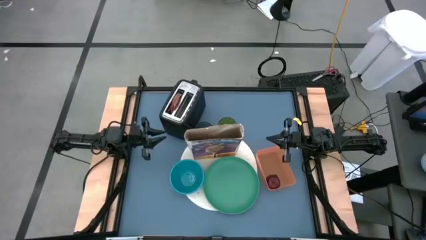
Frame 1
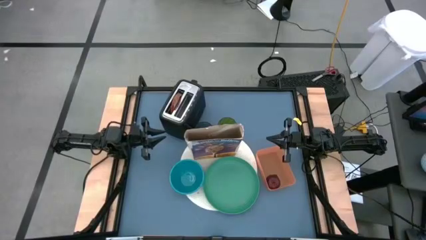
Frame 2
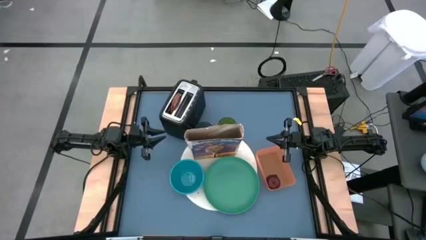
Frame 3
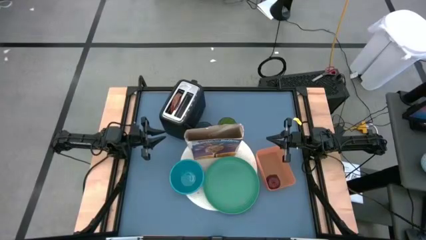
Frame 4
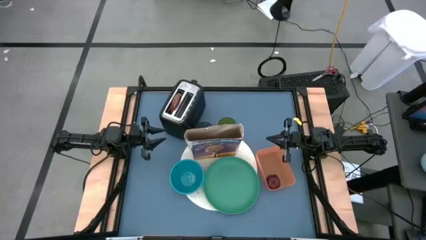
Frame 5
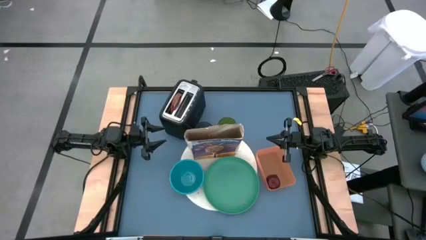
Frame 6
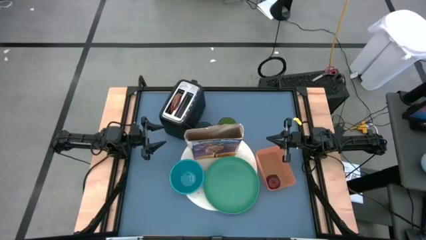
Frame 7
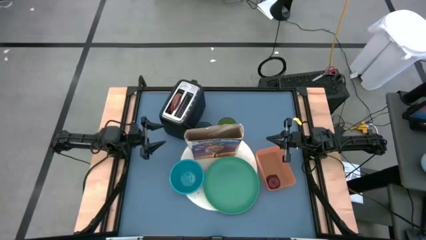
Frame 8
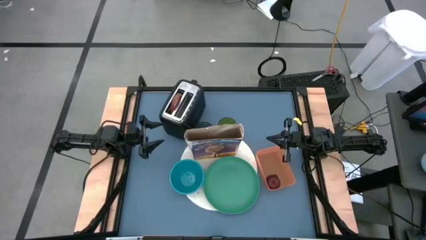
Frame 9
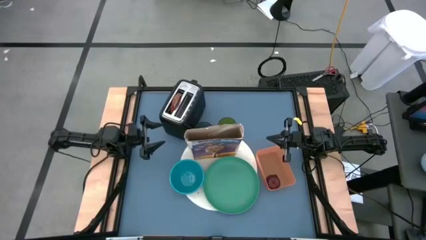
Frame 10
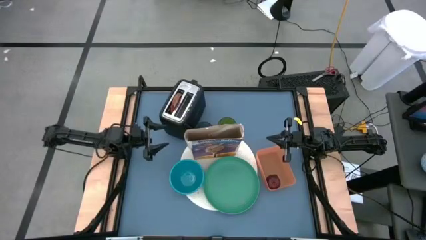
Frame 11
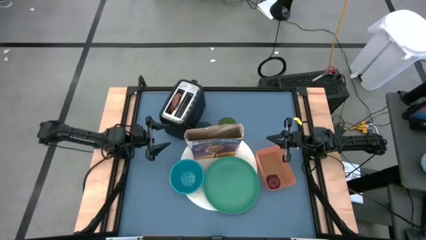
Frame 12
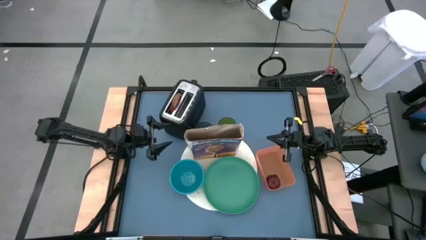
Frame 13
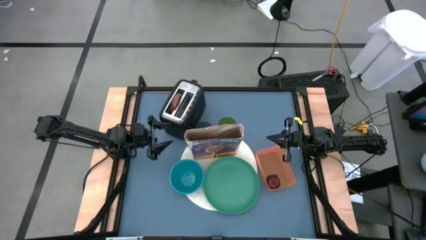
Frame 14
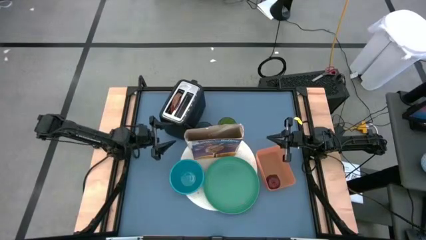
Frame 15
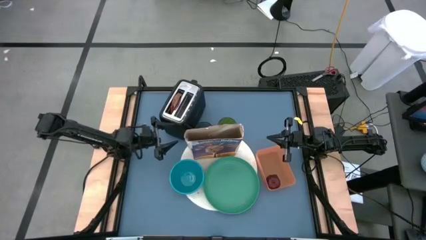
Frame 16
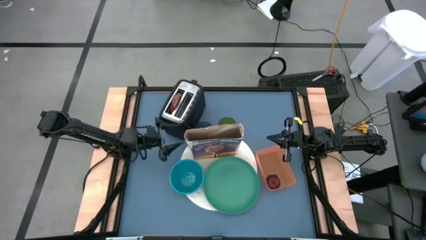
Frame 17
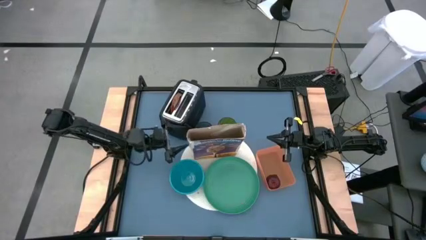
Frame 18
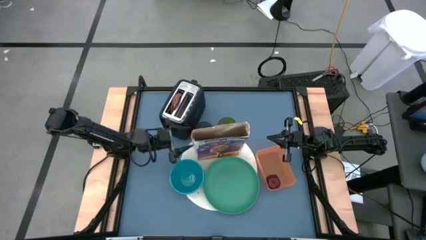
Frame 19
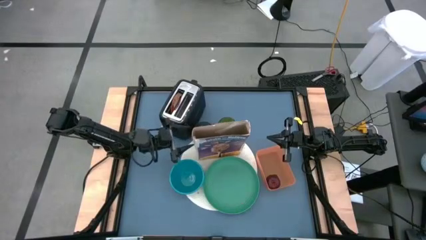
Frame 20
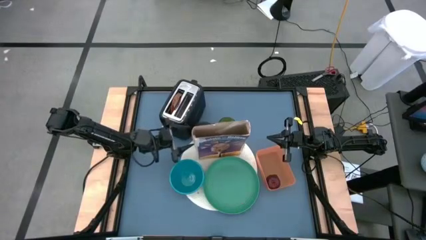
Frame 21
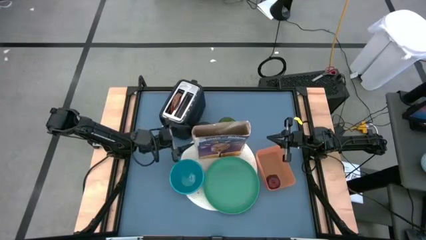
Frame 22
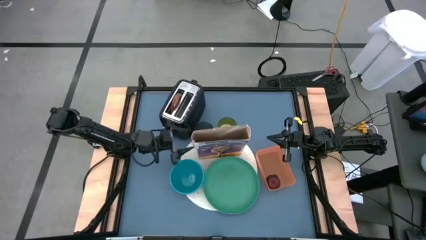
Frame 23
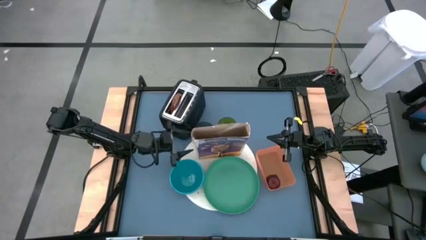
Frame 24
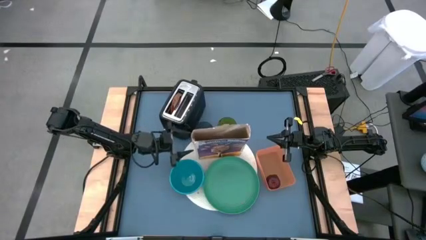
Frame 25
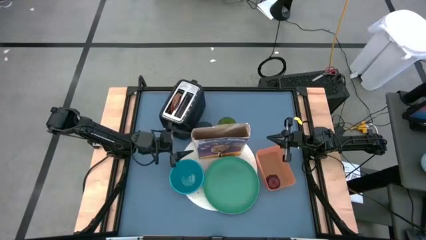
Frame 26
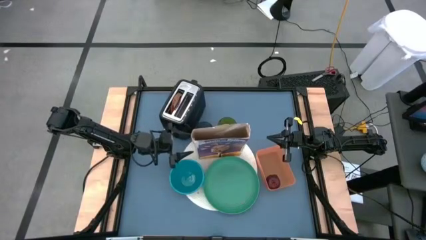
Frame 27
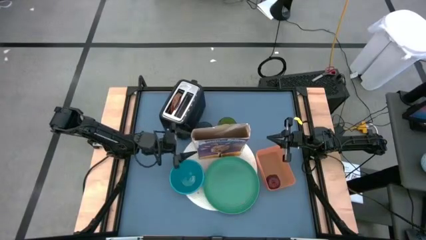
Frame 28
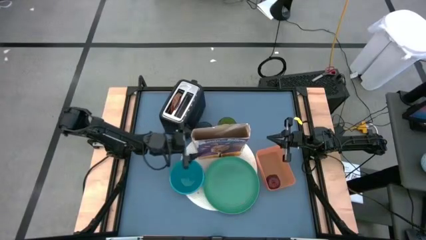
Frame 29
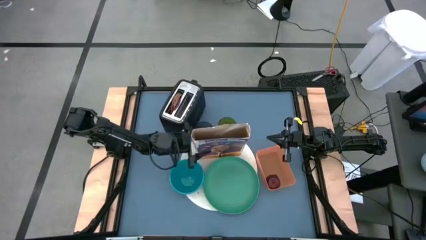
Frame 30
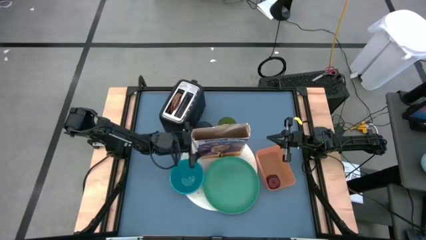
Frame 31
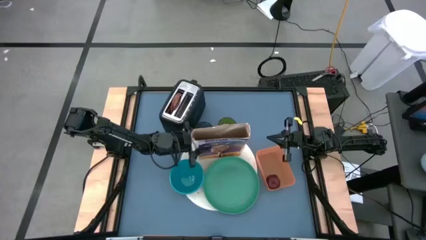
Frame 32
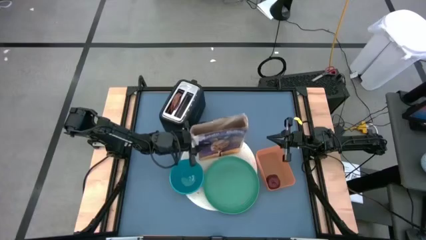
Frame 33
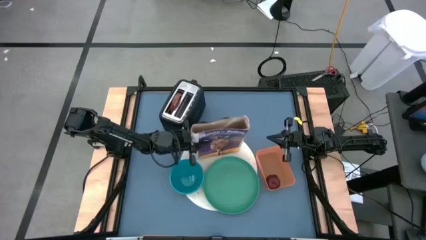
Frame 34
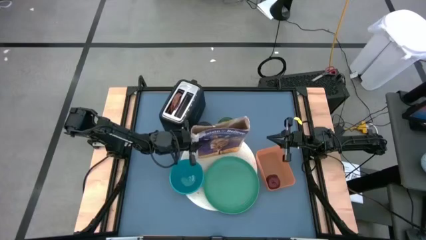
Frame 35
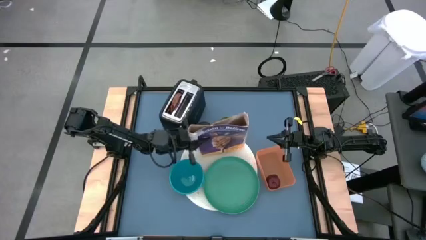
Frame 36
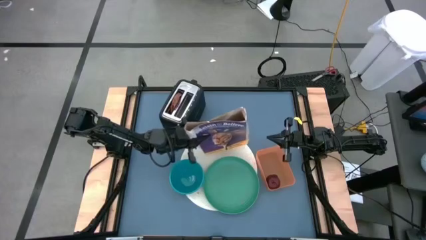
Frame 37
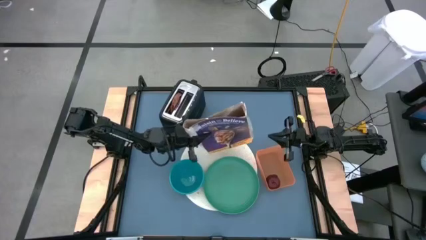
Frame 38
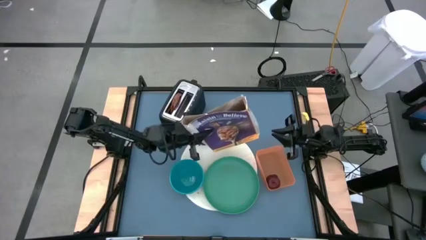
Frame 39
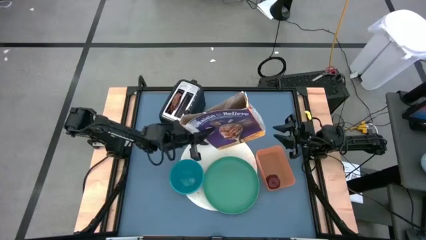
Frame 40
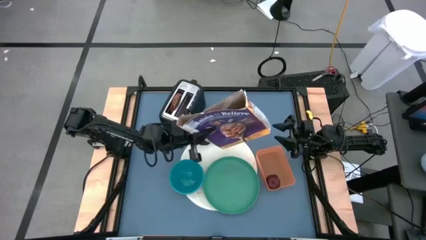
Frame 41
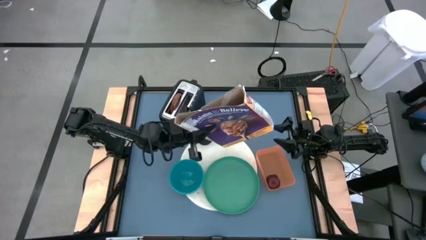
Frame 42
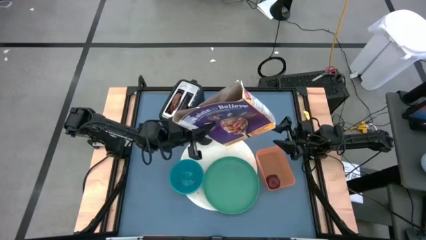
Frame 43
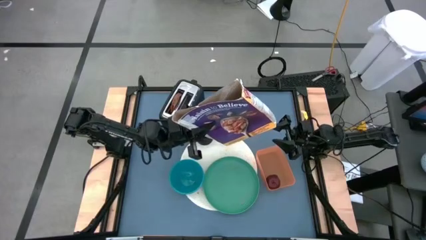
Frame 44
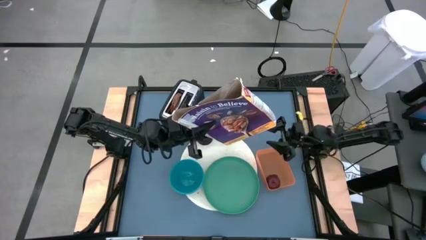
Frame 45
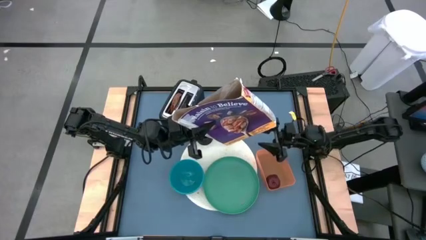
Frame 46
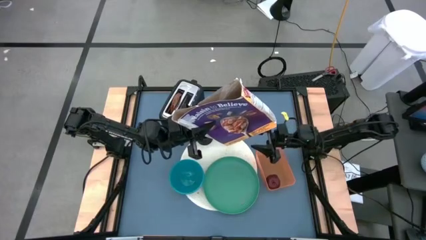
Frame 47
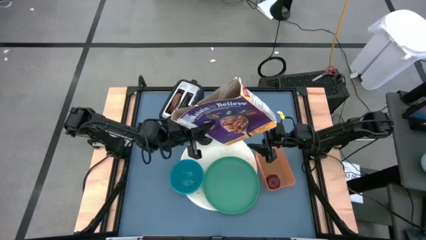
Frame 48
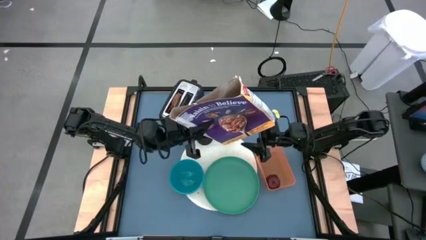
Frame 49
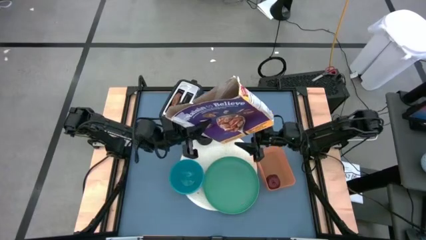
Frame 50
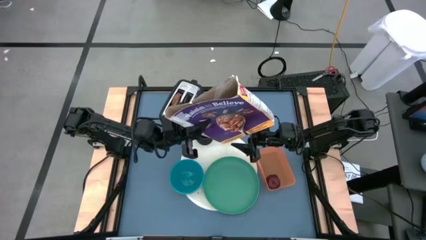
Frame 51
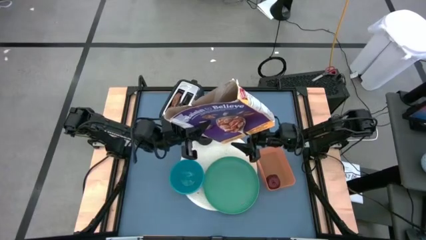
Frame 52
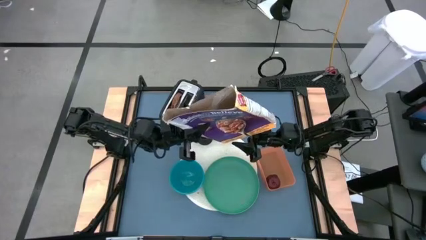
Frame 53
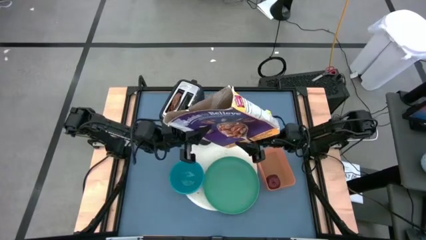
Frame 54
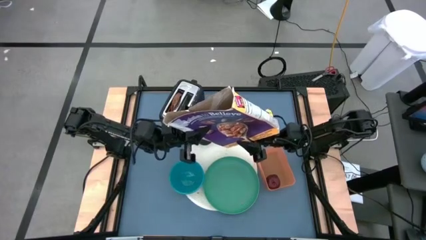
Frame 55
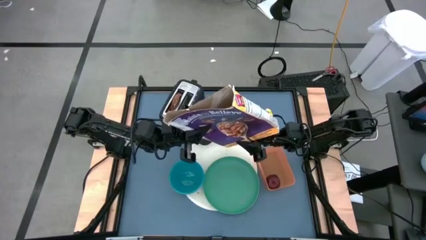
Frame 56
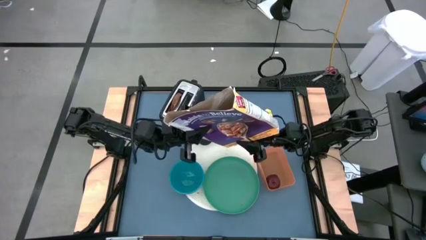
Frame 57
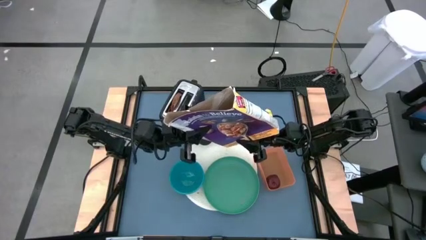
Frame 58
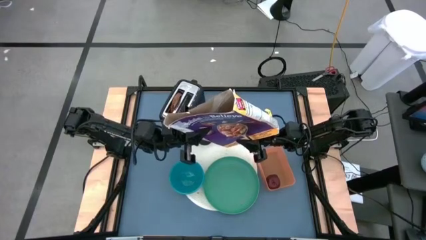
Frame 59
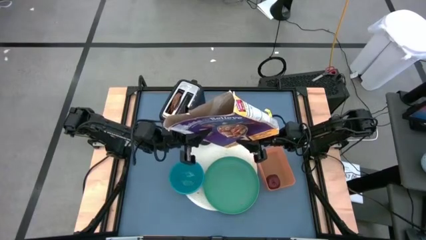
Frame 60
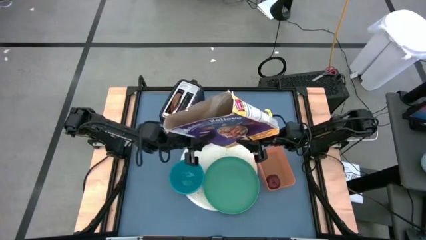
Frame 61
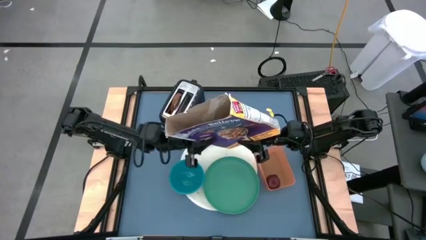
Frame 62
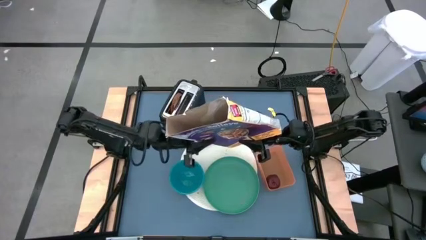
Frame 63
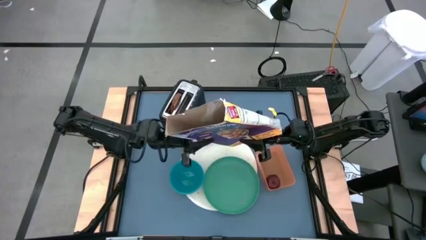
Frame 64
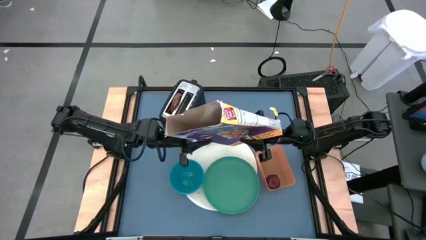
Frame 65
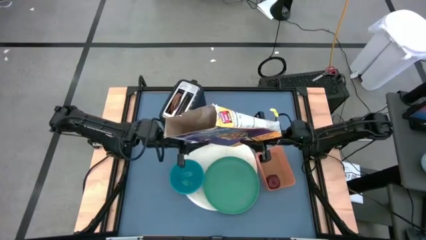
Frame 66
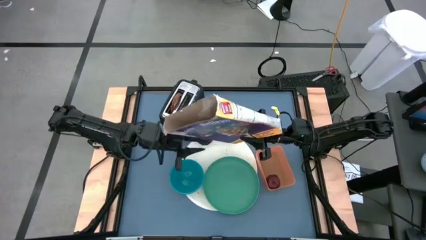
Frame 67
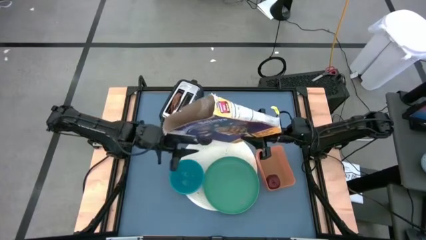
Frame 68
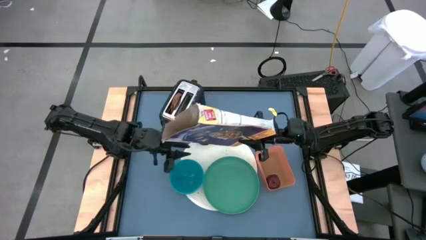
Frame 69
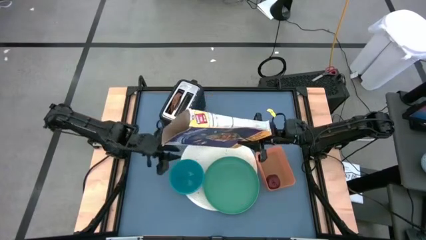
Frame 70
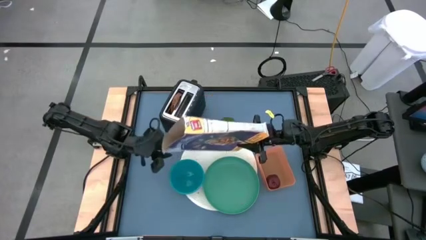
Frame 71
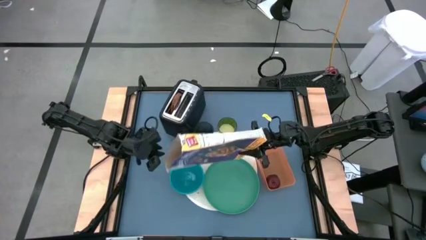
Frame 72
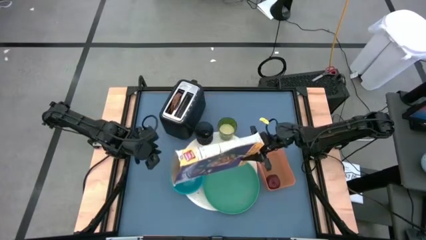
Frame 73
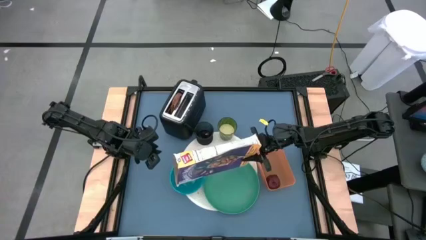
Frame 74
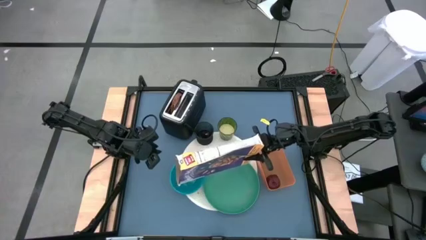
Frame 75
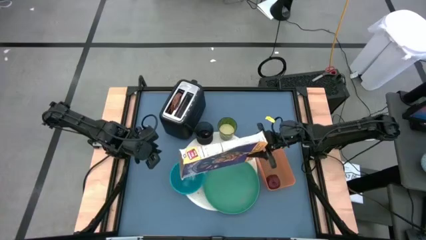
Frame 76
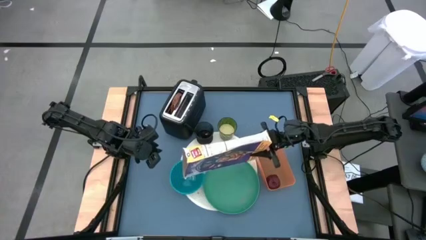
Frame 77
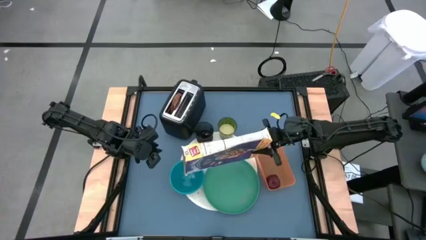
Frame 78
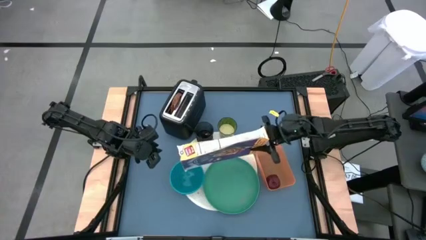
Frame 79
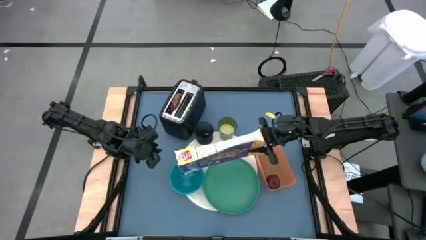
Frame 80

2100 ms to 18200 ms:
Task: Arrange a breakfast setting
Pour the cereal from the purple cereal box into the blue bowl
